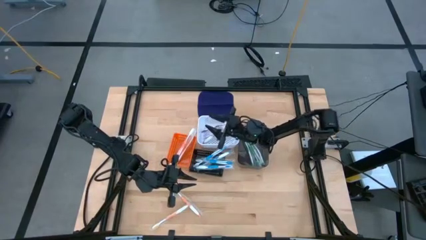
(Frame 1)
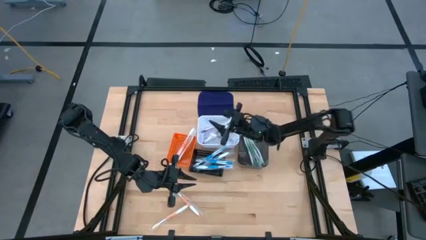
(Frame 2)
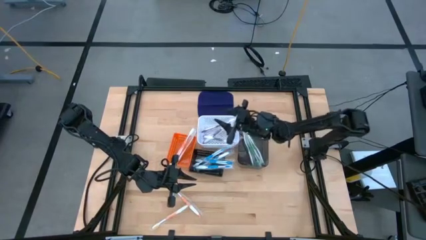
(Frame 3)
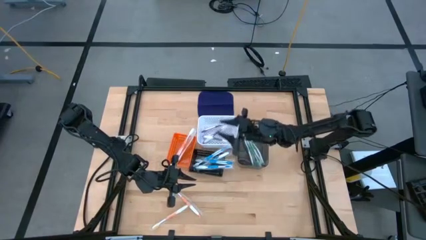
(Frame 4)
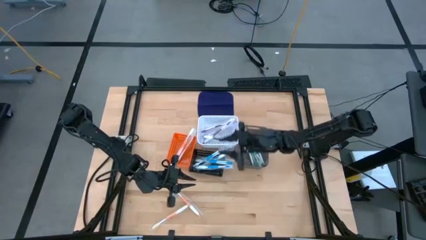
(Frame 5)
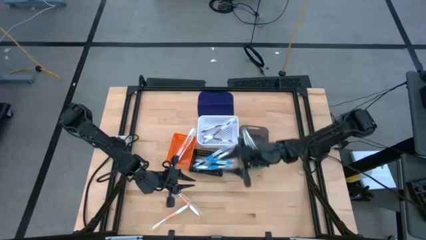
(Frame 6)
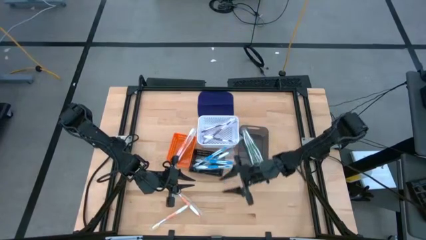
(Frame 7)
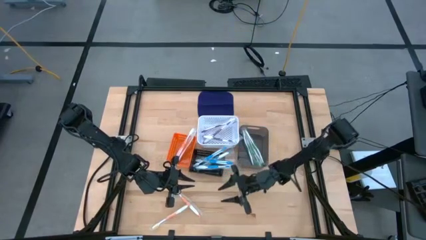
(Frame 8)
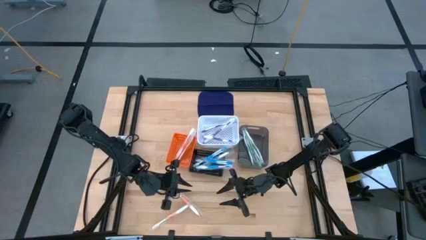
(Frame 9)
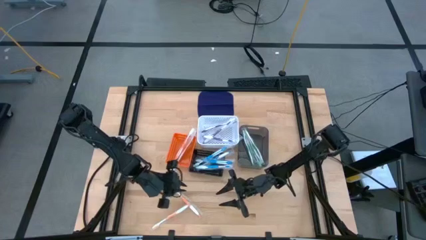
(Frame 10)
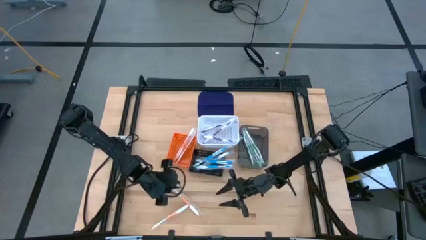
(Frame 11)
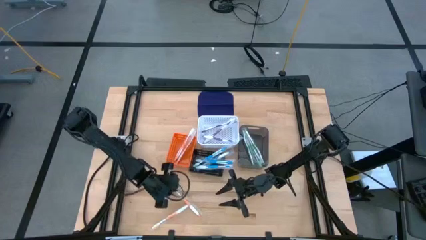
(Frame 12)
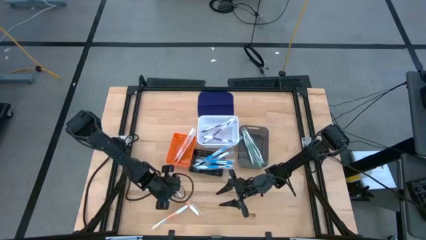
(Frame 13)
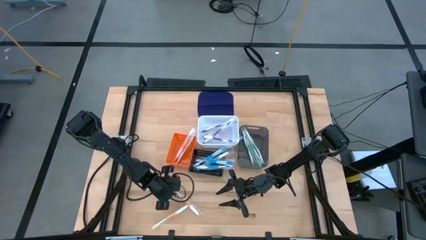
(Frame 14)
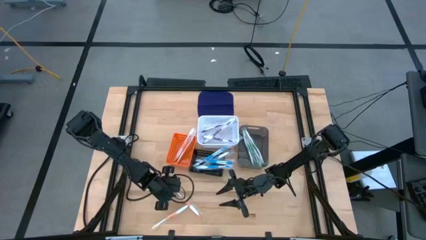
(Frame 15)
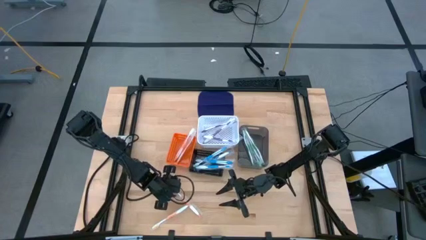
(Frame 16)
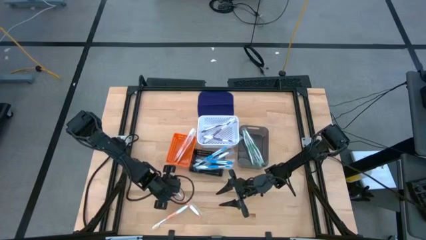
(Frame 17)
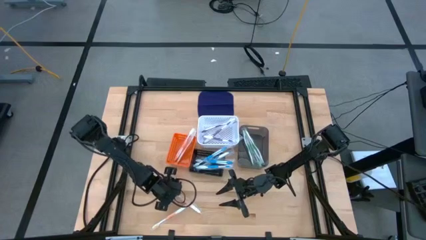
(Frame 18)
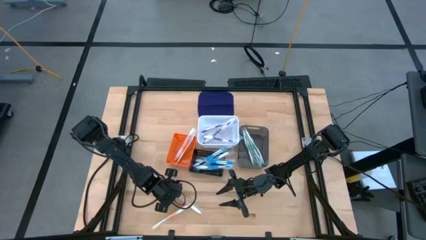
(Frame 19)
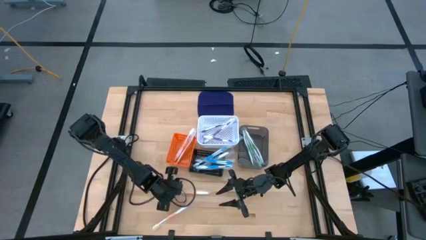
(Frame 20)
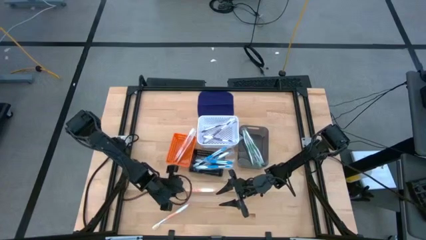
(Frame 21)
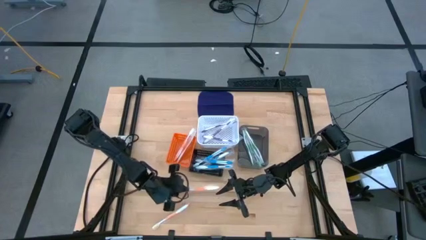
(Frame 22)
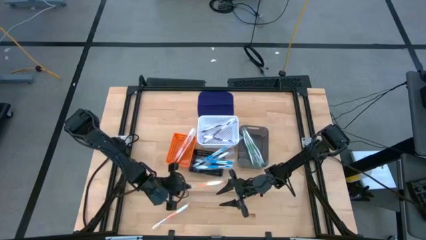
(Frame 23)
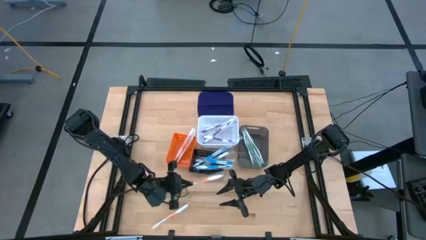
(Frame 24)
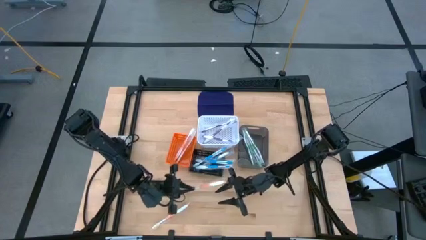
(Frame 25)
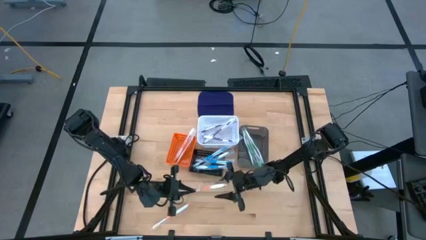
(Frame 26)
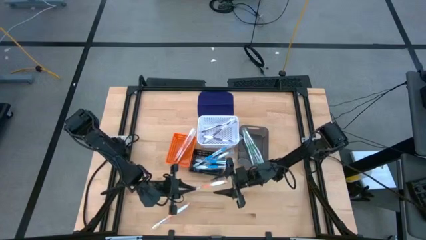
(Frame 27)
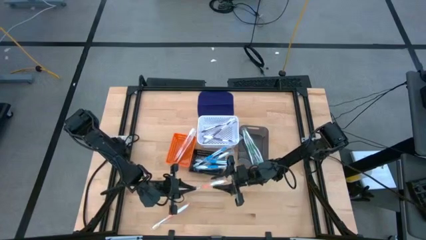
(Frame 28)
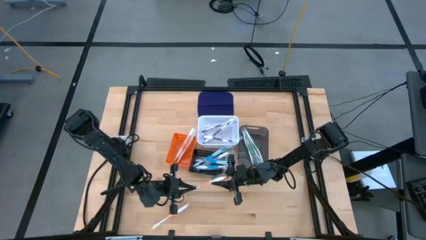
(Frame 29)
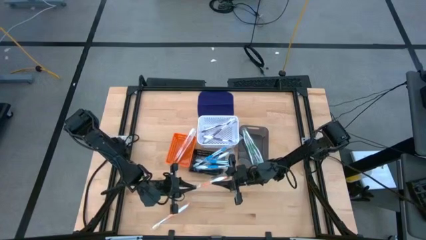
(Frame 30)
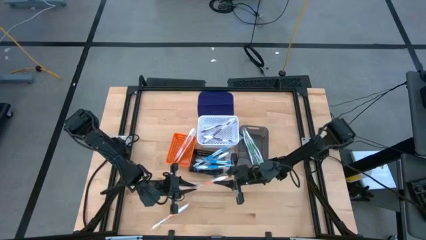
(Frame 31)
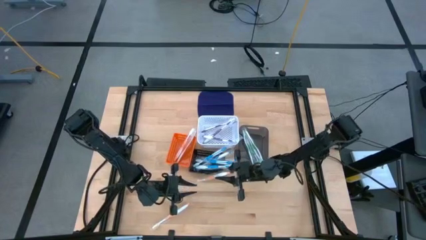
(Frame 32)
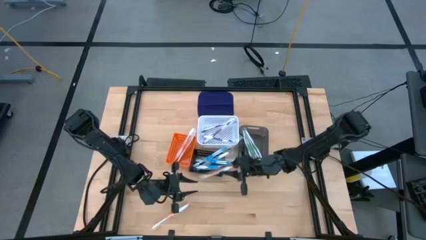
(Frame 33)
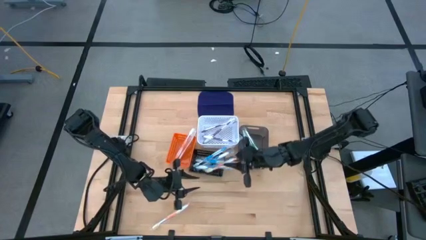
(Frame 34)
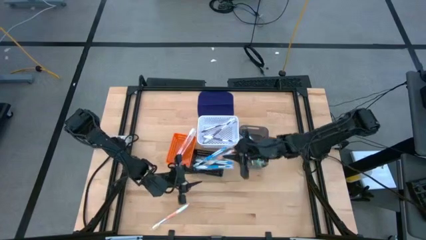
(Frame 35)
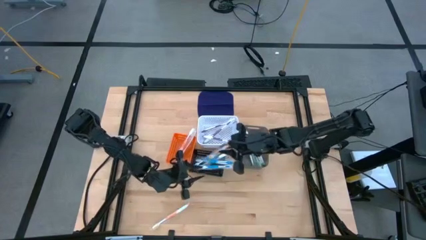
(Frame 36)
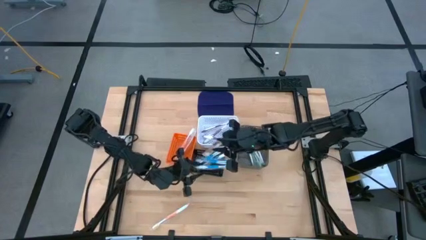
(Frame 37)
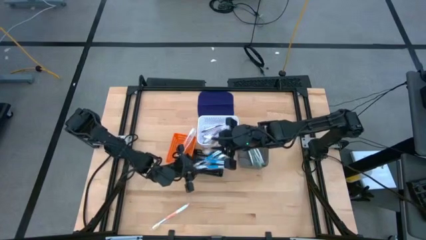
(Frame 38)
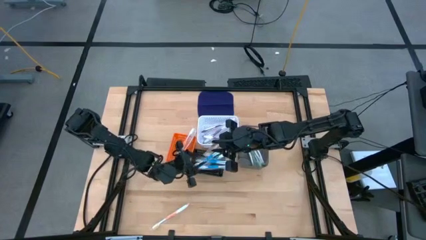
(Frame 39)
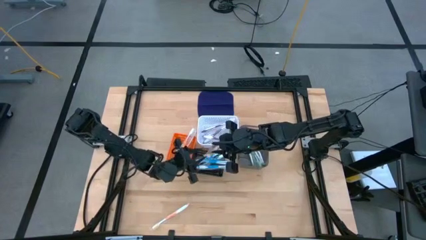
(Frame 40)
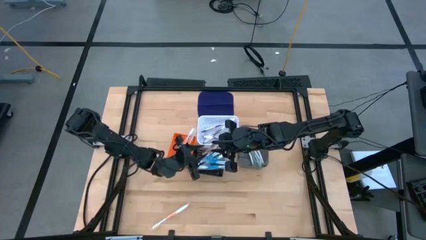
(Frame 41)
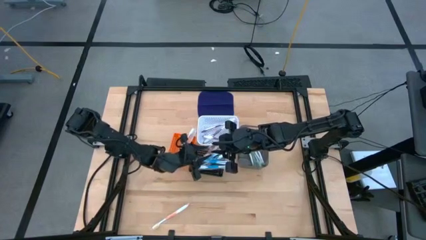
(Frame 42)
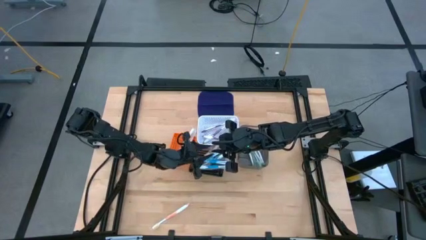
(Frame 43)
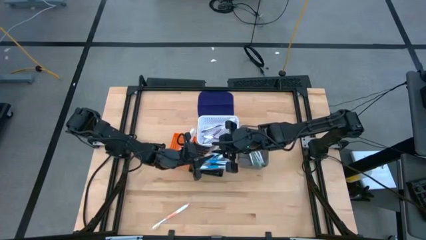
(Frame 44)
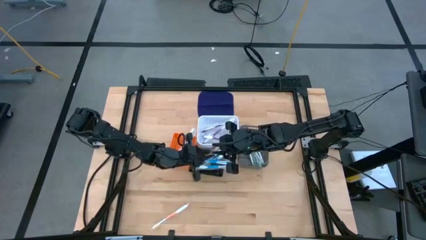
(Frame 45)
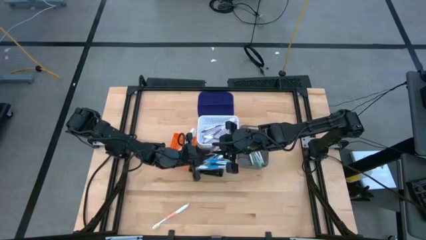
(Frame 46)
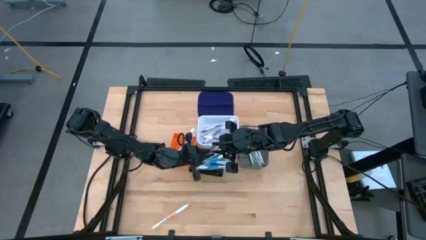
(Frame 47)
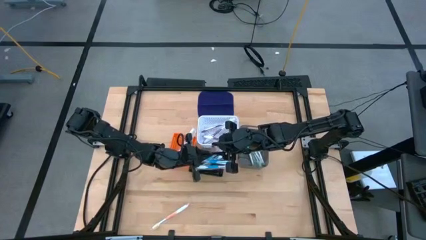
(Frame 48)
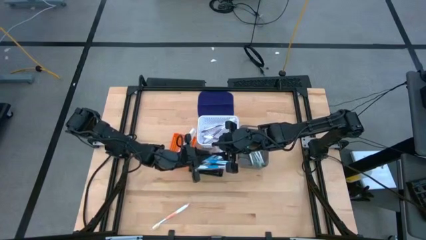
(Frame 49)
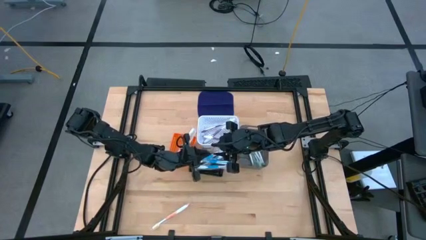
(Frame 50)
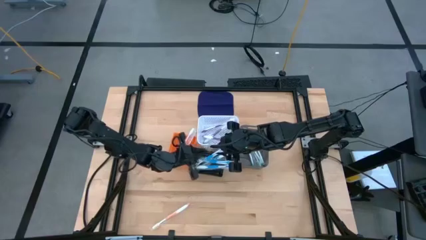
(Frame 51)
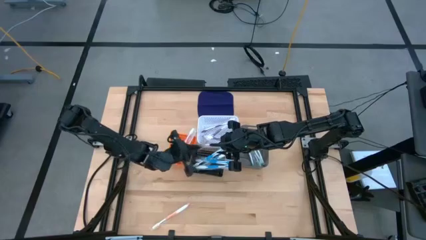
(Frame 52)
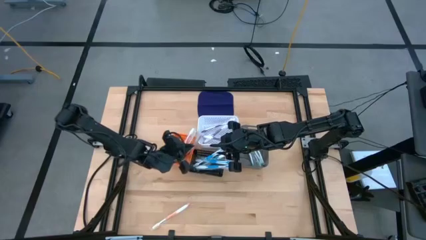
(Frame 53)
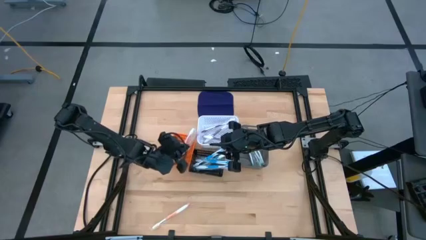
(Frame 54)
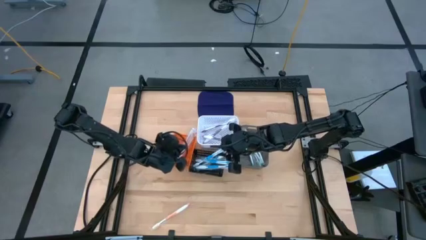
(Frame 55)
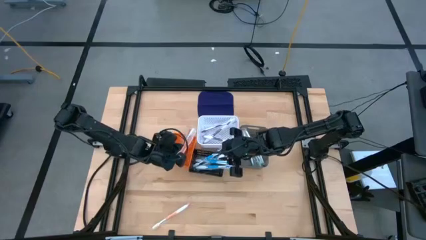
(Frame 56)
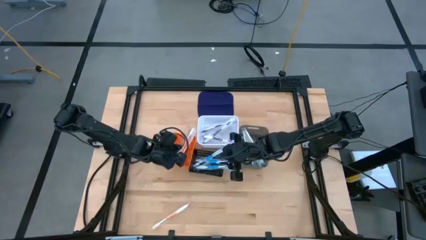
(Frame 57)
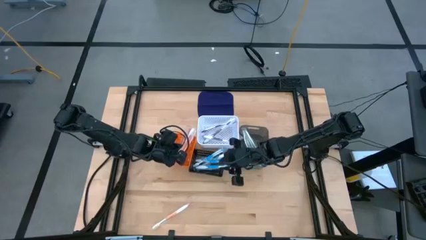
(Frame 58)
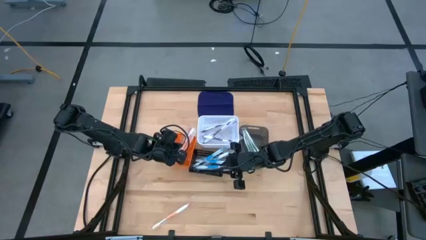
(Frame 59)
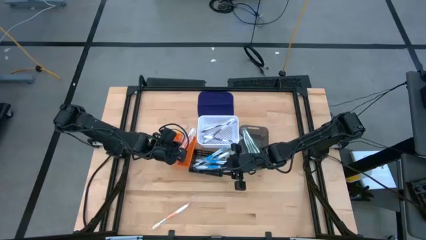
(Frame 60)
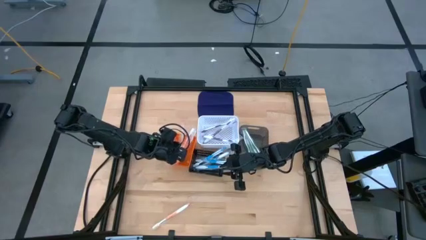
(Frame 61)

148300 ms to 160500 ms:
Task: Pick & Place Toothbrushes
Put the orange toothbrush into the orange basket

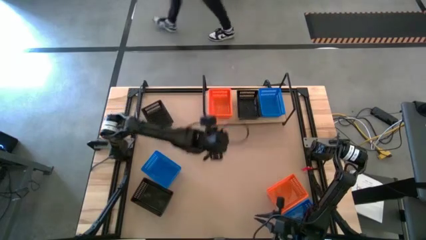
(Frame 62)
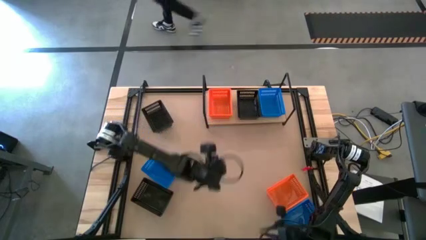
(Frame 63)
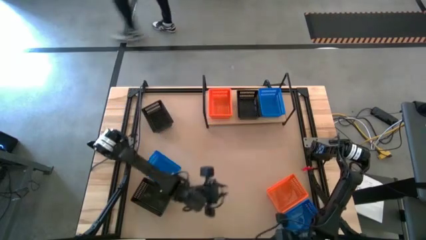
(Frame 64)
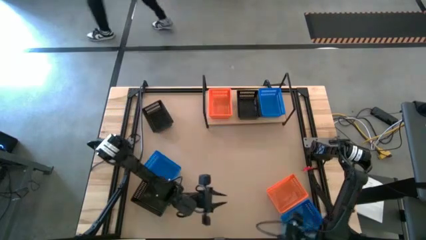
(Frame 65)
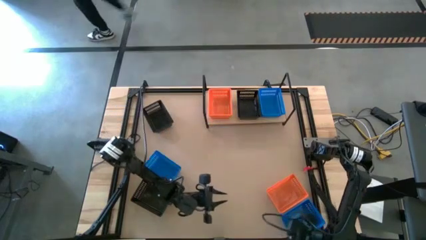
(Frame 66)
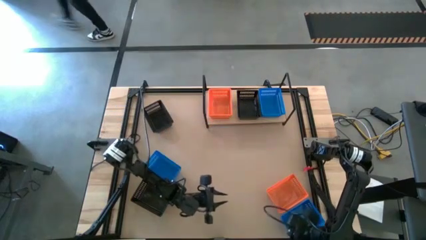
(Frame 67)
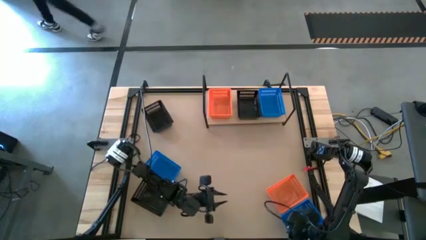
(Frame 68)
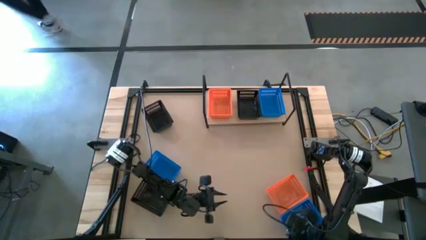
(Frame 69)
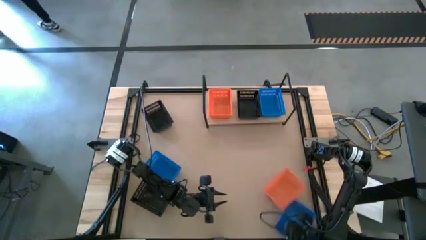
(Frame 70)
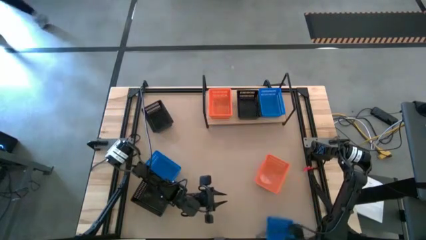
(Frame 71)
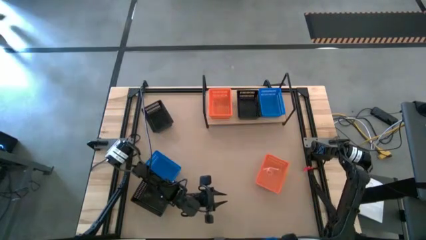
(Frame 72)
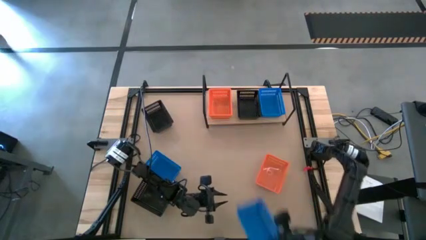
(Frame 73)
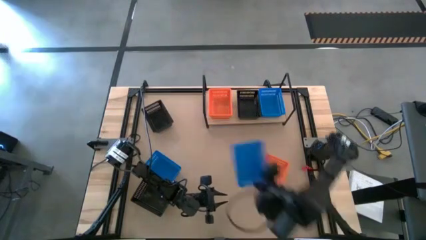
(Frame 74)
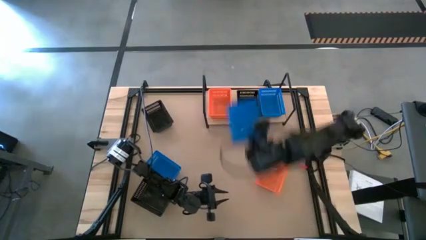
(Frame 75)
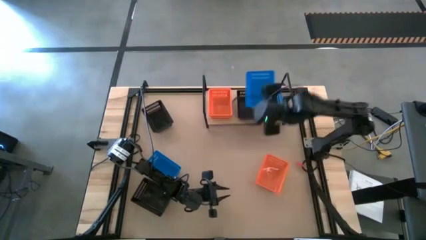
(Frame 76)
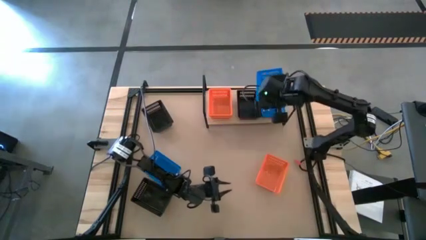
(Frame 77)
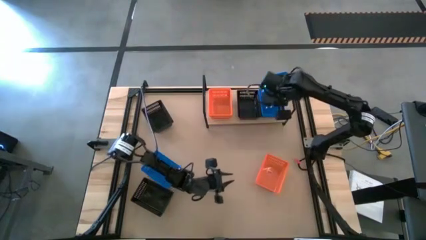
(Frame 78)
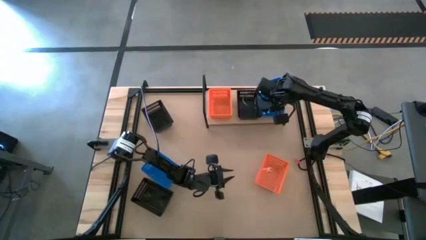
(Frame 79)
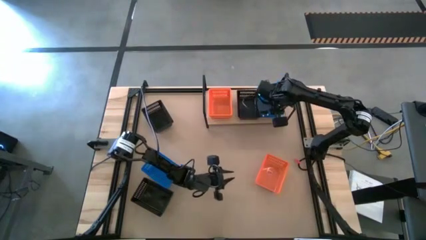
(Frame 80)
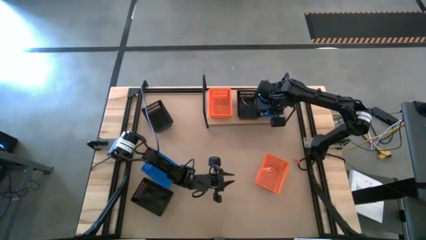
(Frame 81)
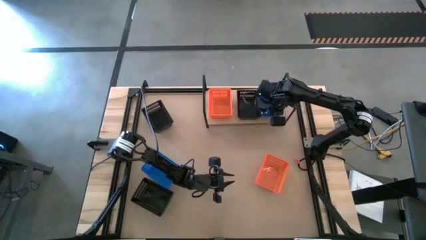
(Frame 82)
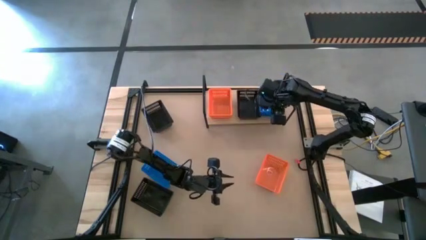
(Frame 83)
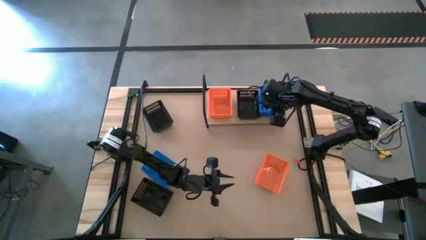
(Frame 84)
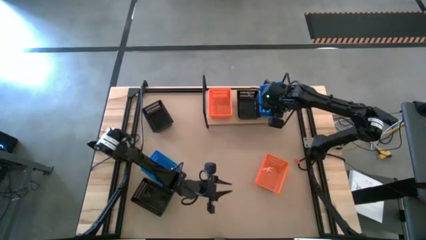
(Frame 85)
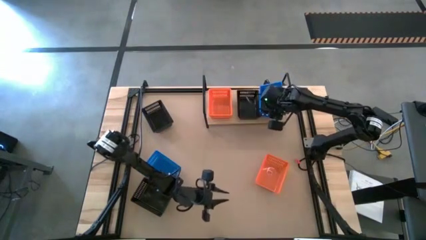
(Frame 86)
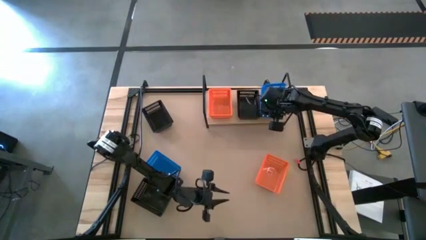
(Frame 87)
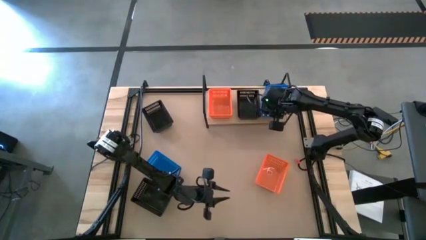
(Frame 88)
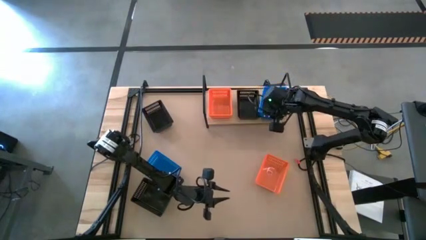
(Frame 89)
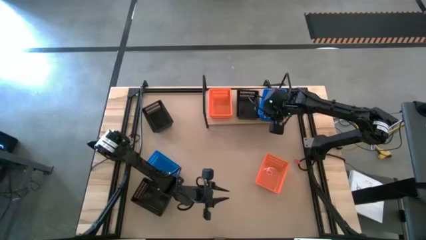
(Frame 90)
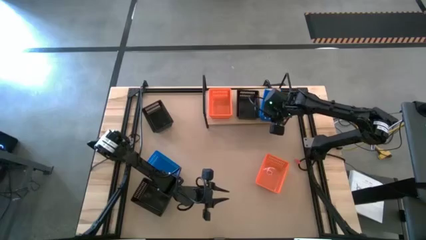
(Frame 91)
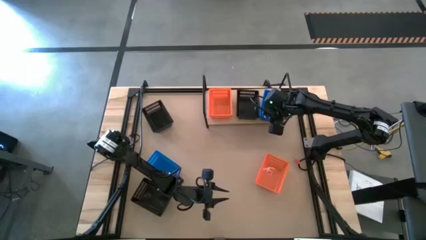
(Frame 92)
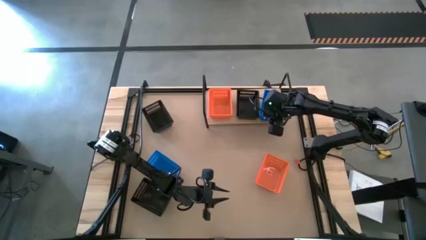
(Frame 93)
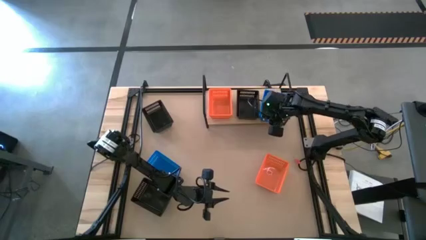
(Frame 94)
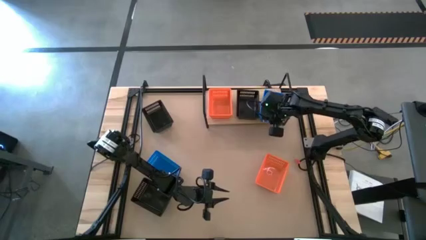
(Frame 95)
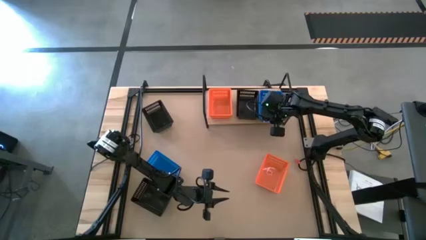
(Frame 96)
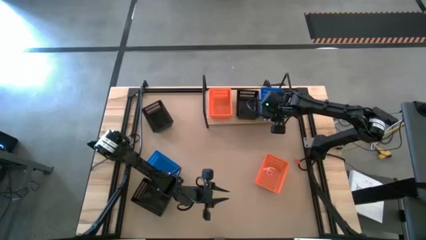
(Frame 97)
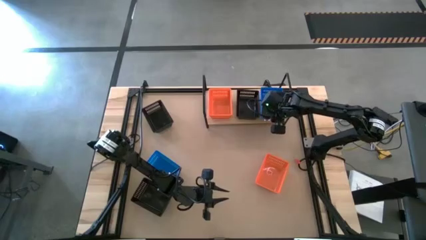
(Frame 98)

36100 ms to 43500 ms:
Task: Stack baskets on shelf by color
Stack the right blue basket in the other blue basket on the shelf
